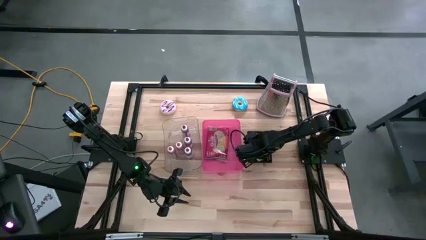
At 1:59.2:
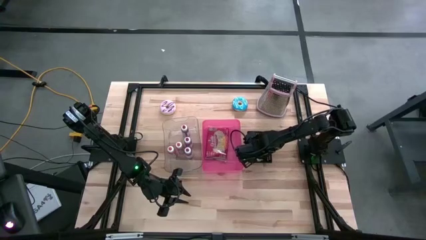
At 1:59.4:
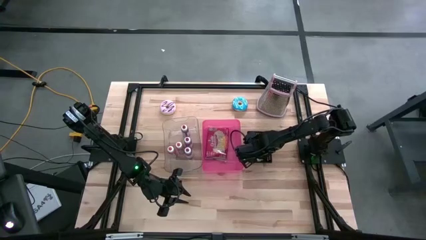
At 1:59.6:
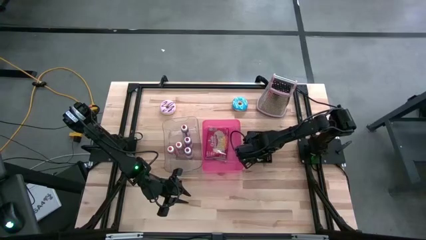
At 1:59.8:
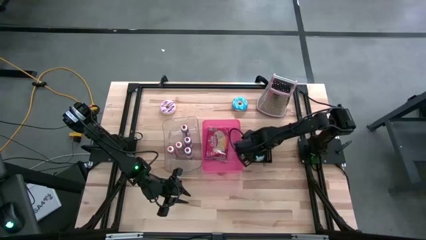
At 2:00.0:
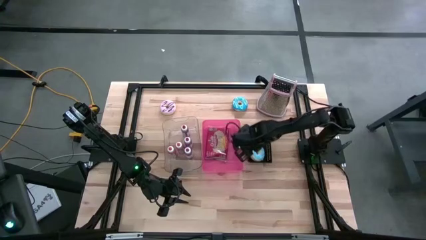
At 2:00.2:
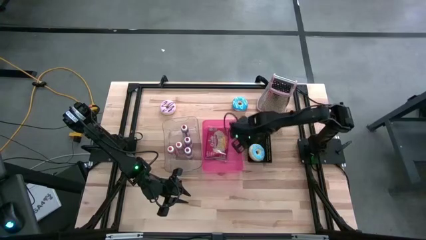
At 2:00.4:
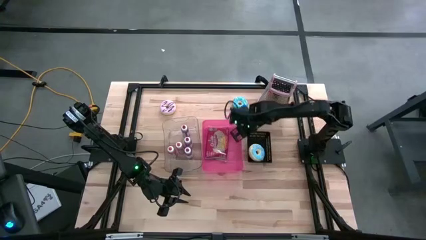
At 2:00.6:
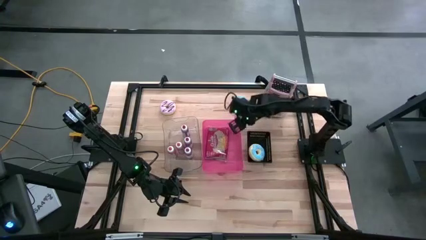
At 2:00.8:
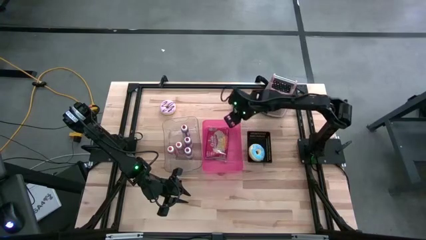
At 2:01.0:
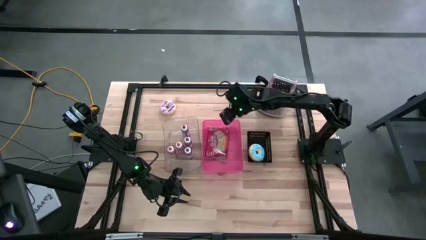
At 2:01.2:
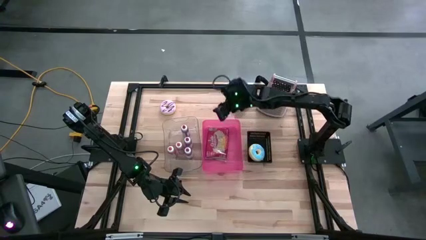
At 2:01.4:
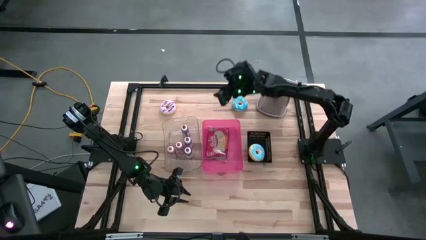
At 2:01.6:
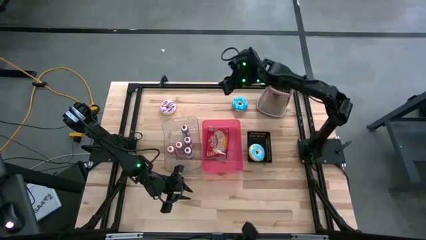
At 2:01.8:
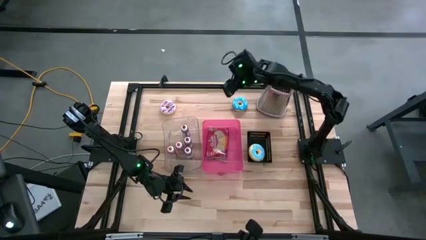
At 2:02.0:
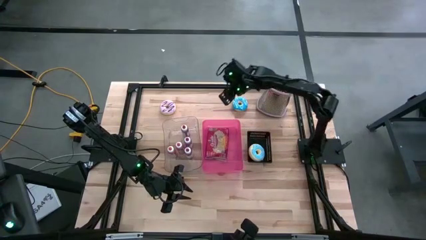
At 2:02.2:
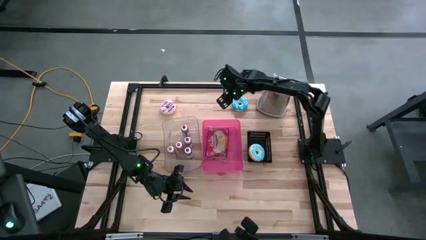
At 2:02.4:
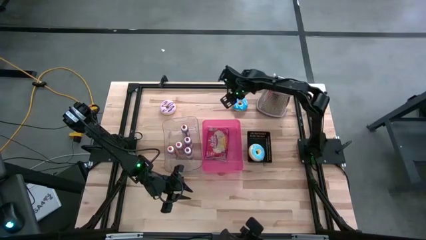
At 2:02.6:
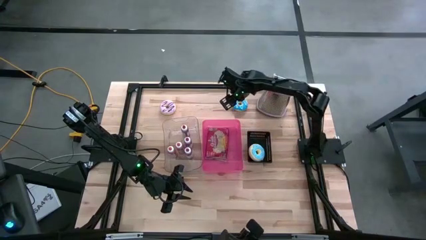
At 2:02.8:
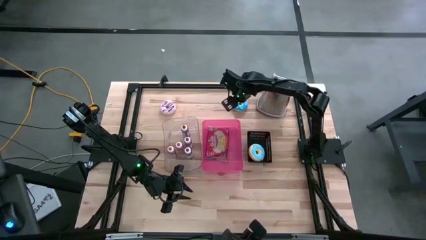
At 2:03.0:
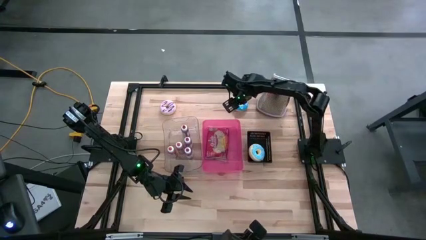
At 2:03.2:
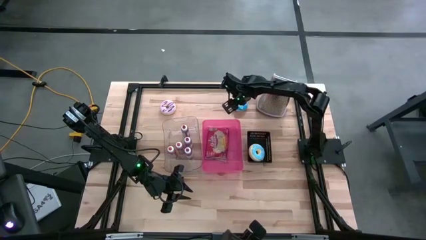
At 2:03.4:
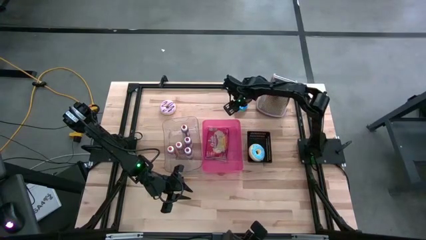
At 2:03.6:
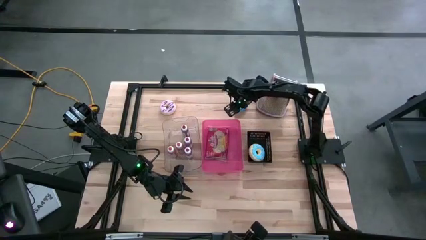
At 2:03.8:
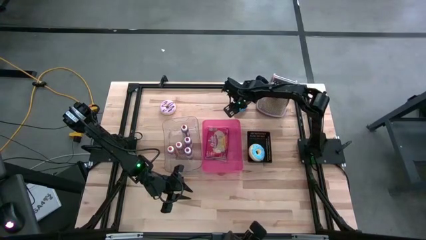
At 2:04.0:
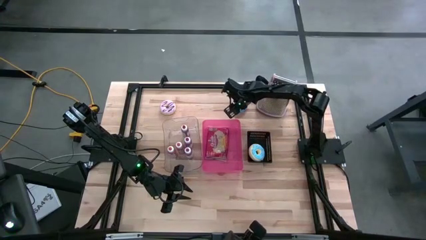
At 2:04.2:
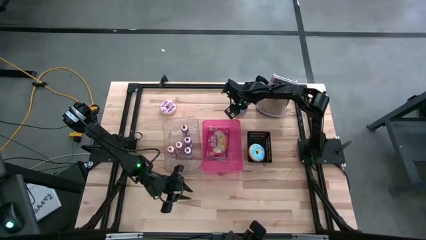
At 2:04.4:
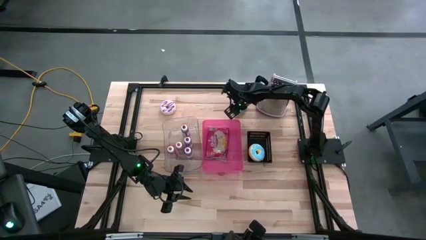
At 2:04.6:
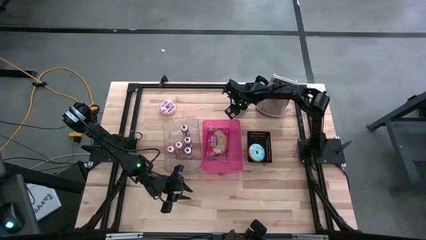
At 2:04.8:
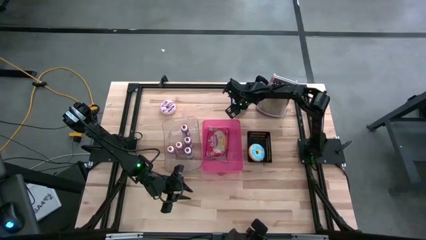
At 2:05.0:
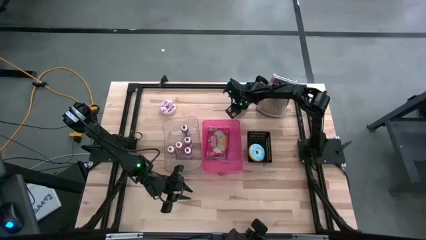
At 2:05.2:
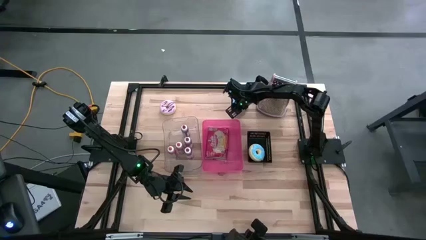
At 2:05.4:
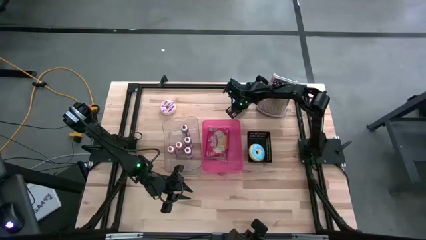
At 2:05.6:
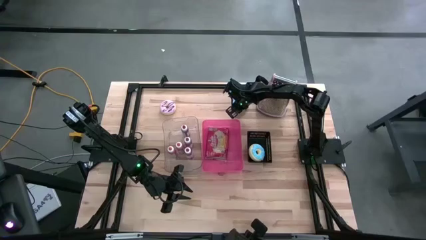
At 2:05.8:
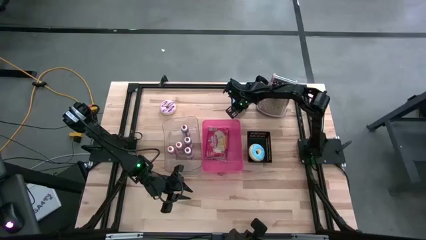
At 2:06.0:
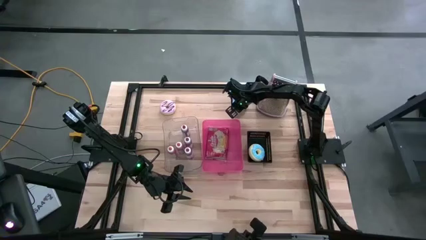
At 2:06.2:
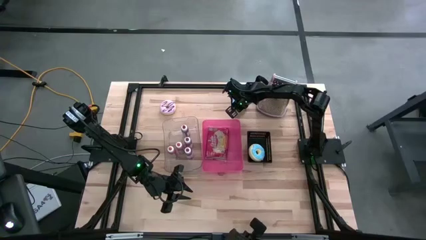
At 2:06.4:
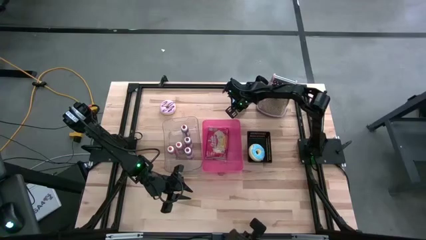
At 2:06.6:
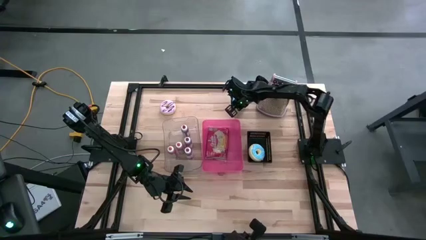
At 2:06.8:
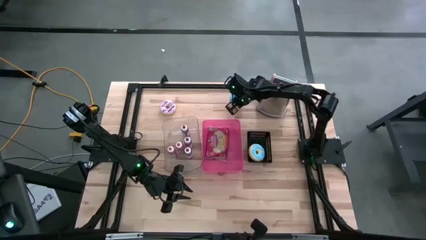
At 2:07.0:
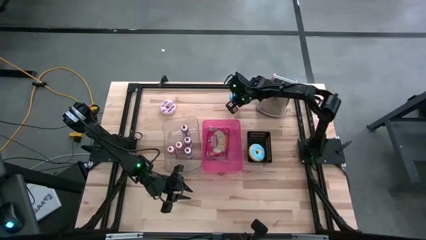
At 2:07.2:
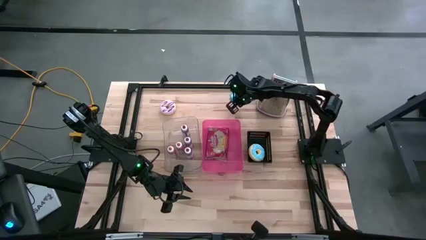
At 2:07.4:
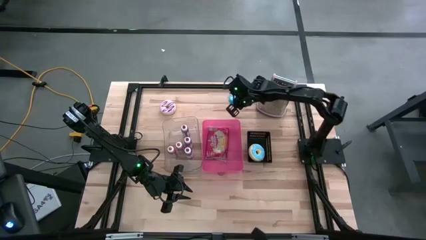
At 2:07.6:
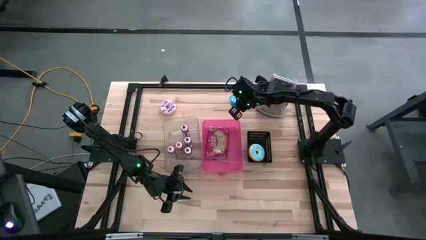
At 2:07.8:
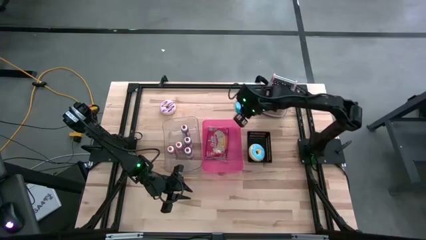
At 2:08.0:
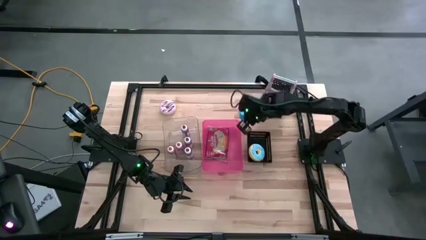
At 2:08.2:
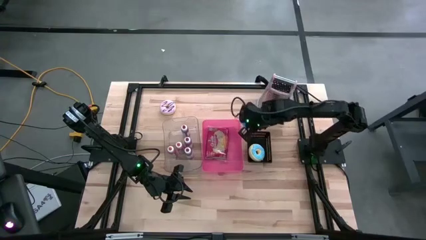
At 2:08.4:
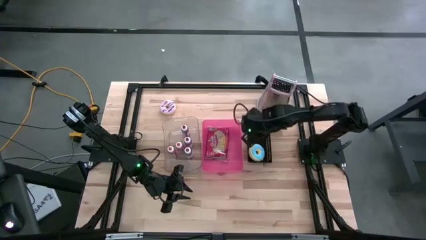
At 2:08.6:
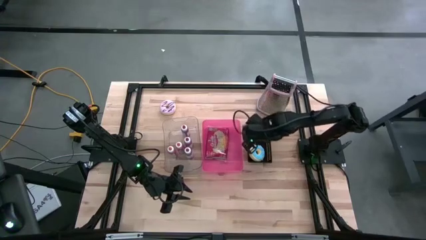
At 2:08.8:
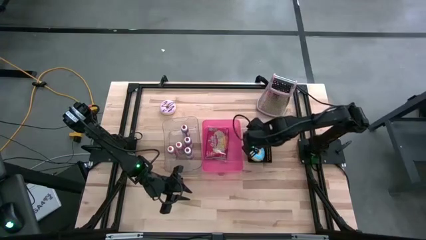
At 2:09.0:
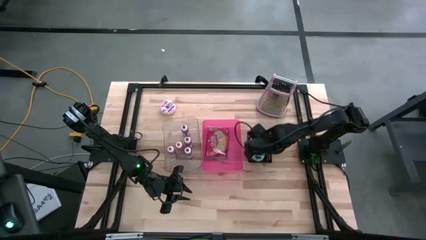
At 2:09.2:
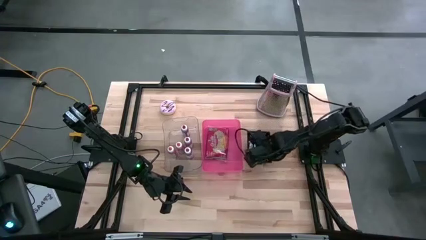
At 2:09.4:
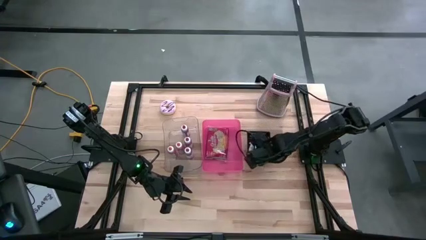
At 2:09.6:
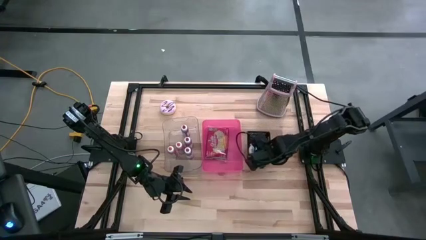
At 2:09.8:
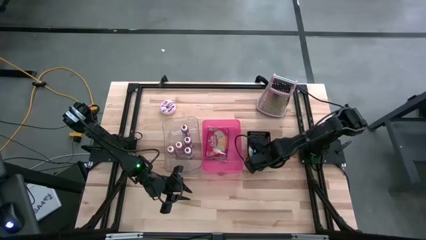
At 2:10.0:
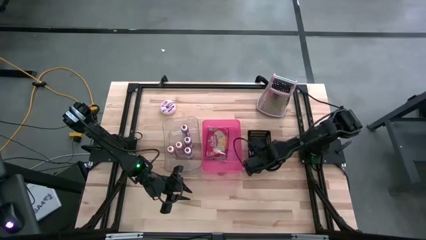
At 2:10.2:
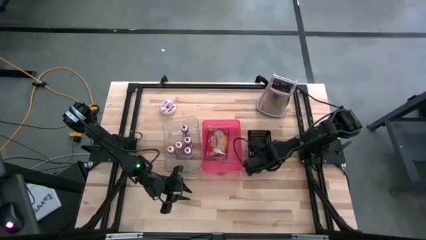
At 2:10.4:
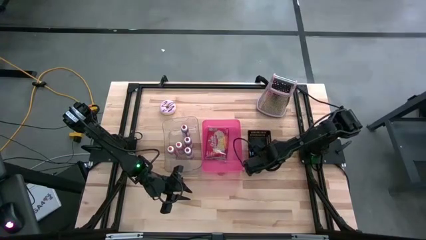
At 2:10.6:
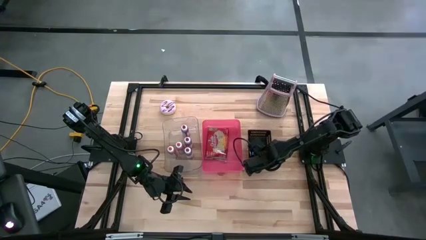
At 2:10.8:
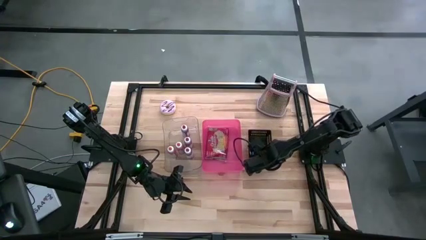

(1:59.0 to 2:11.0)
Task: Pick & Place Food Item
Put the blue donut into the black bin

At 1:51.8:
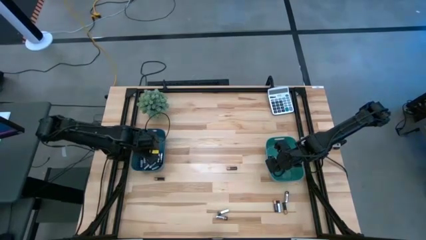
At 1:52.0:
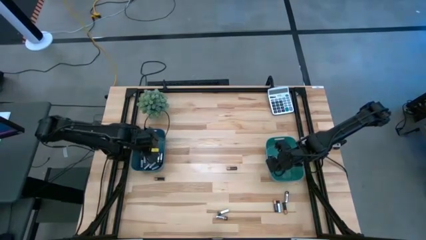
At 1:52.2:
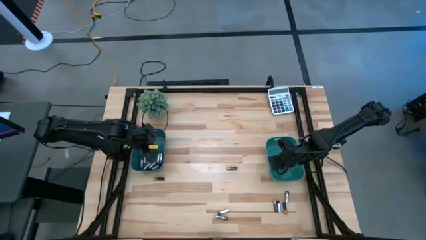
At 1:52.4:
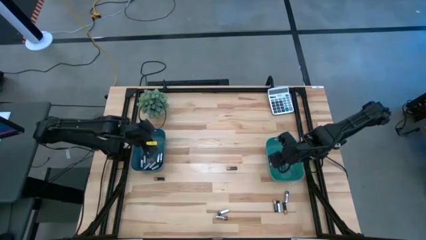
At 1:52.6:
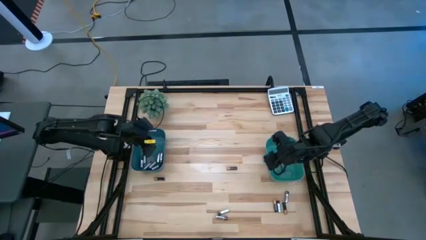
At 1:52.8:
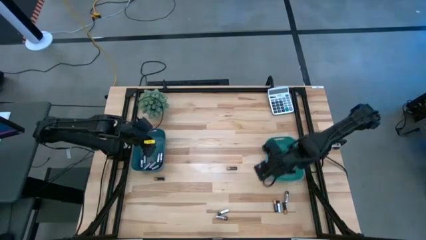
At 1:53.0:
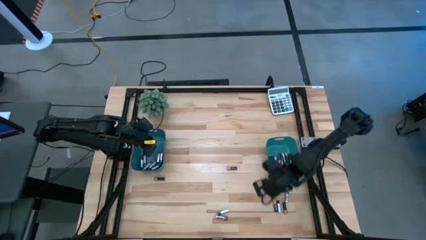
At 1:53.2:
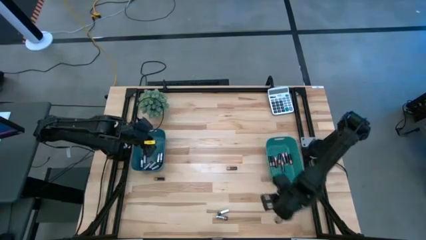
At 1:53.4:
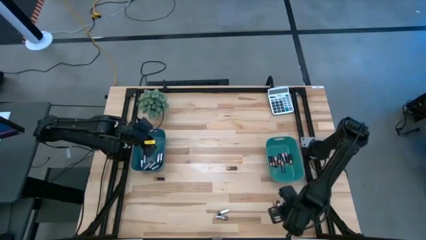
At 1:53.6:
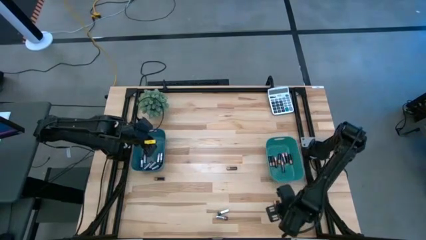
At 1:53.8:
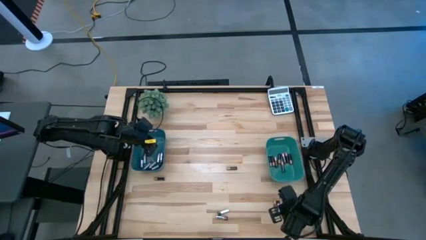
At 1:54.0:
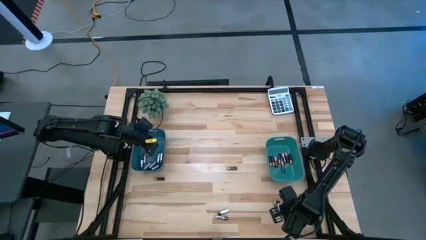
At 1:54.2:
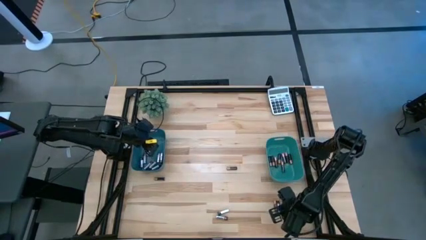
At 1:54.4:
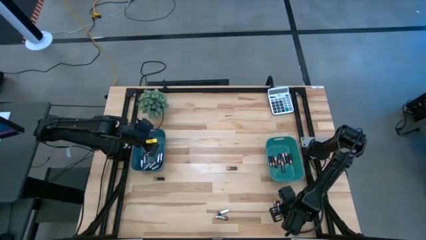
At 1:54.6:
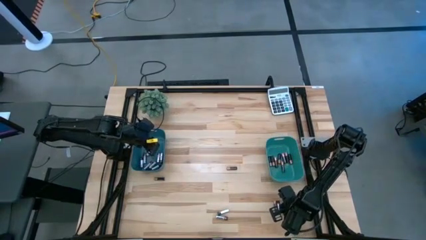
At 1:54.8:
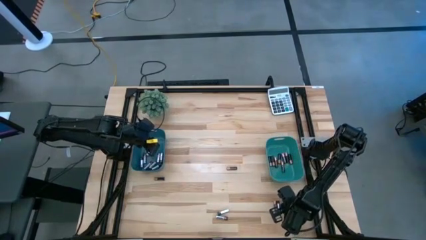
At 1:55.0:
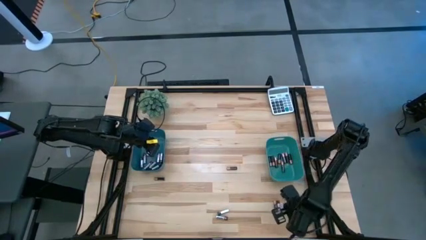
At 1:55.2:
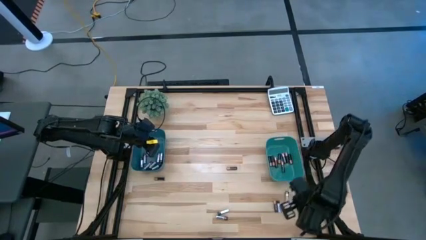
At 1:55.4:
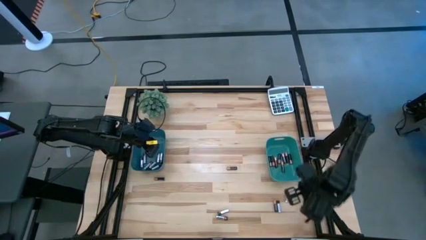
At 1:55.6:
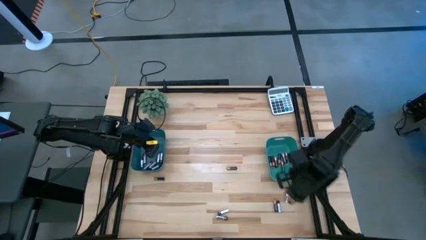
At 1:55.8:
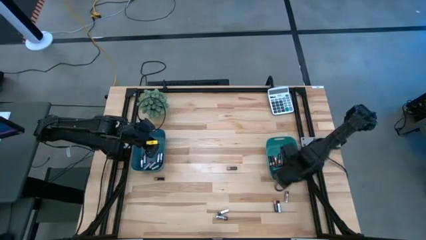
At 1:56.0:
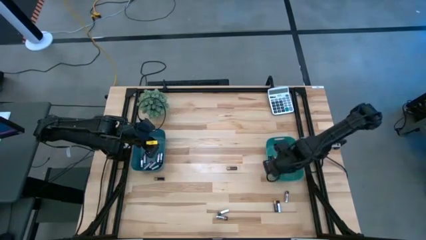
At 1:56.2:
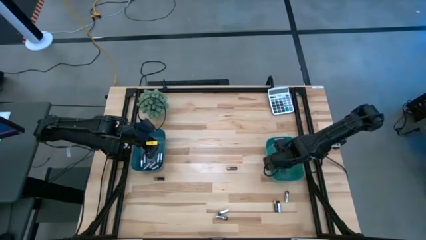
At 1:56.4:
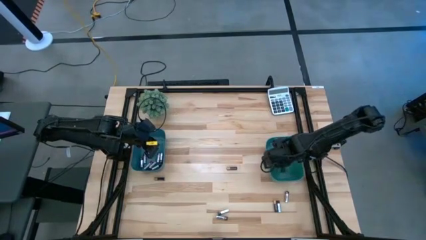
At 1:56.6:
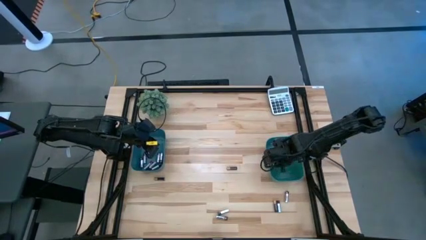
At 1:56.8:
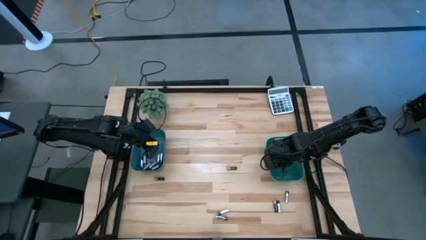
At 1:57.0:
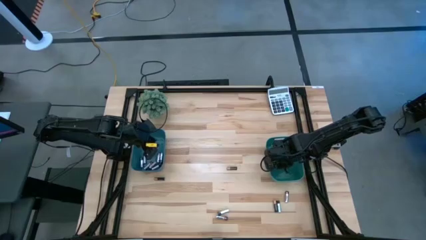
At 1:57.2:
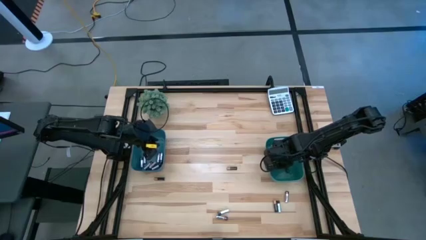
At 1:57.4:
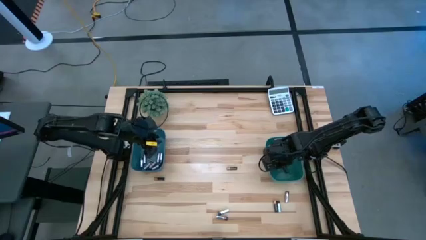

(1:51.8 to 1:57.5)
Task: Sort batteries
Put the black battery into the green bin
